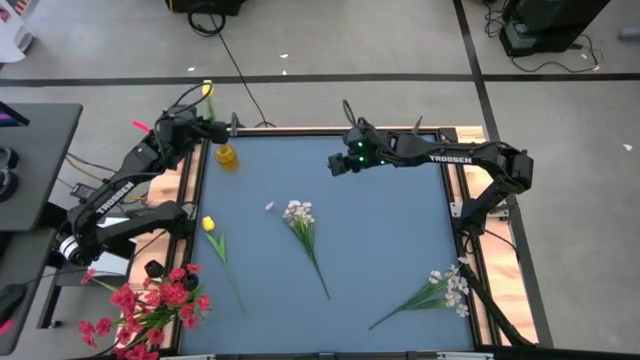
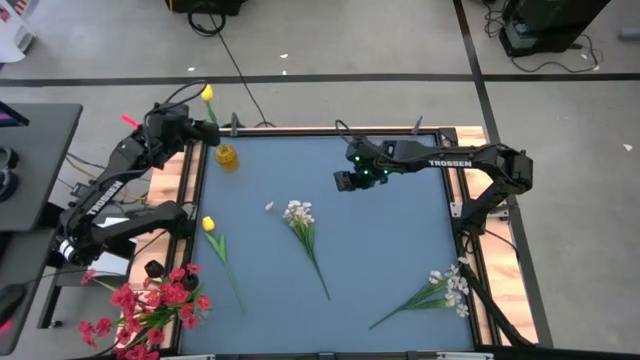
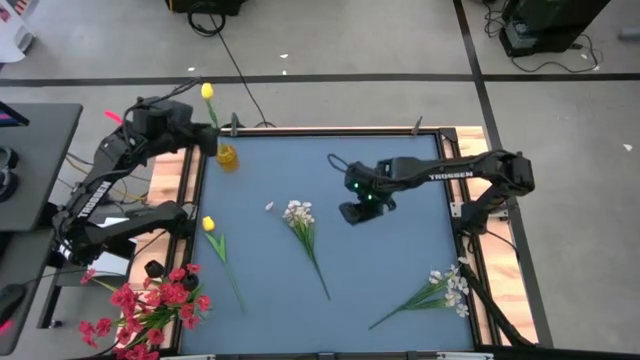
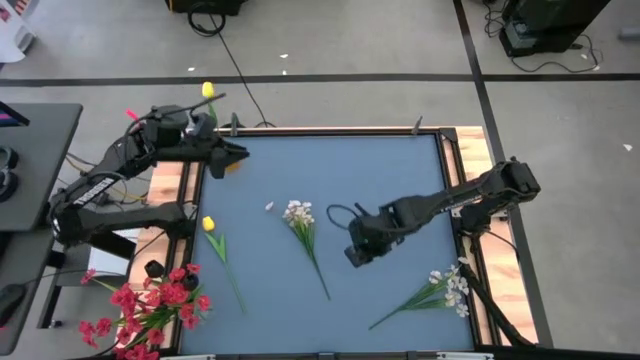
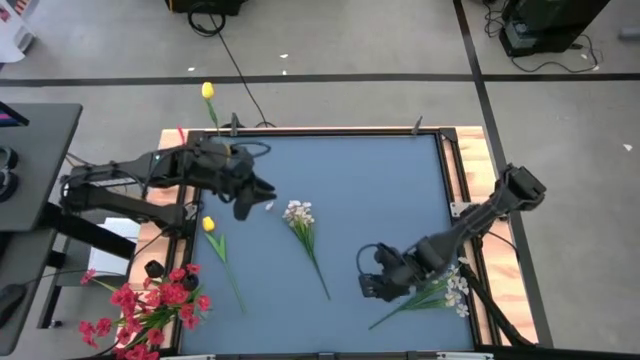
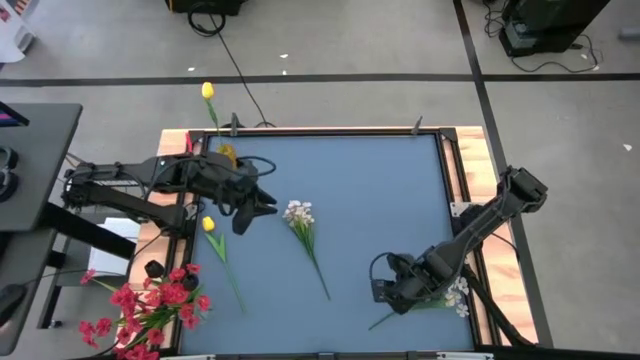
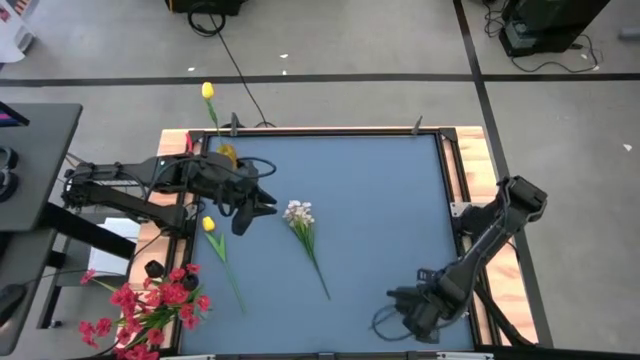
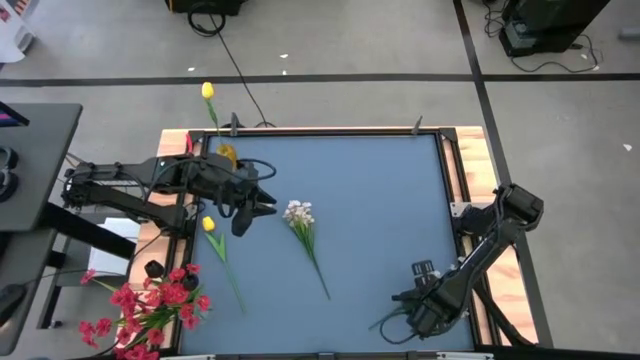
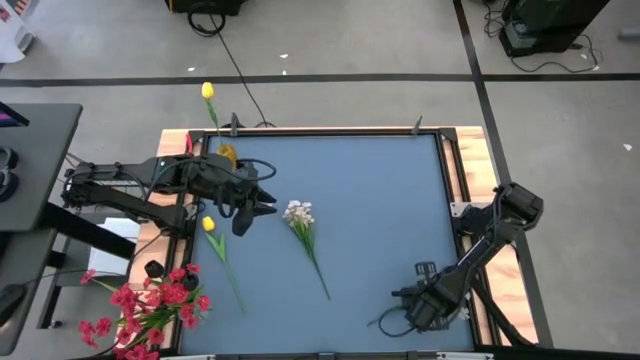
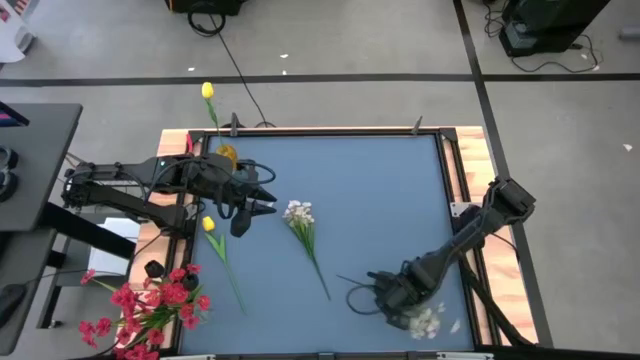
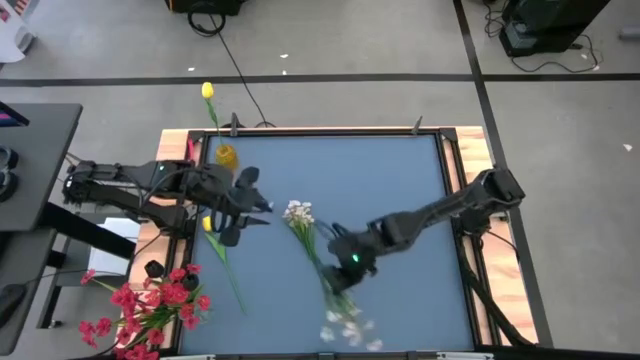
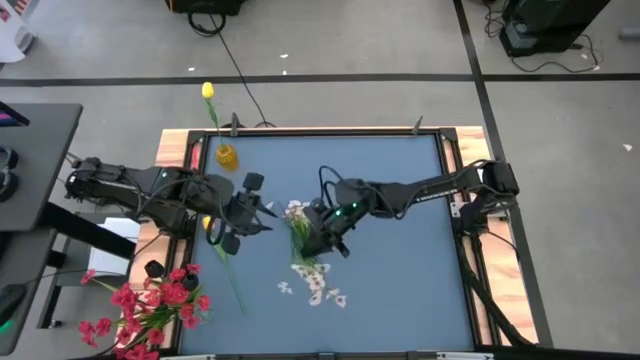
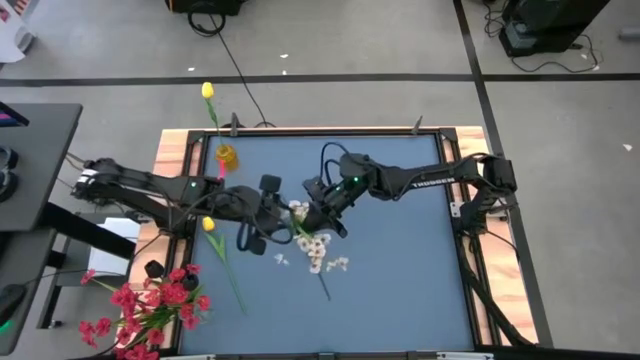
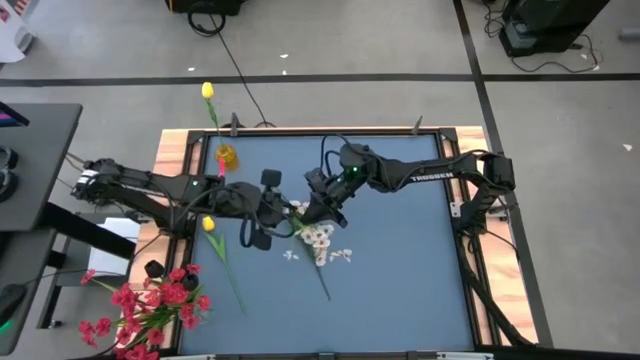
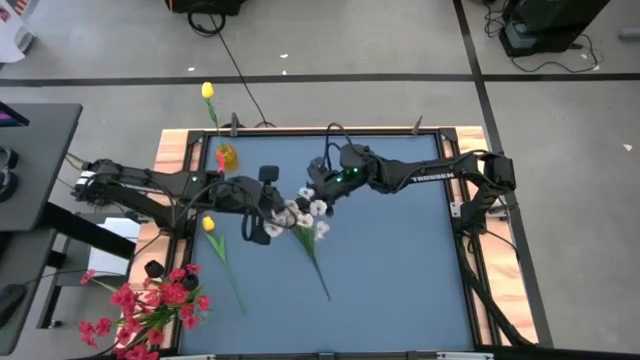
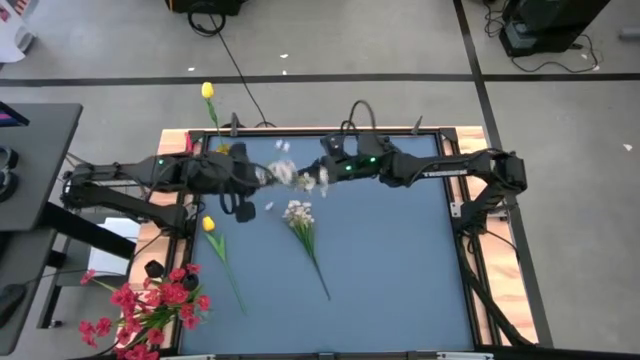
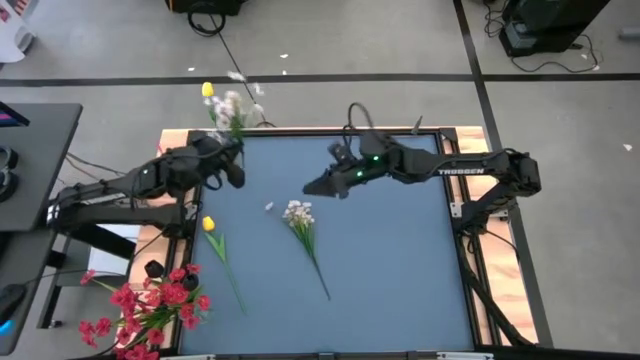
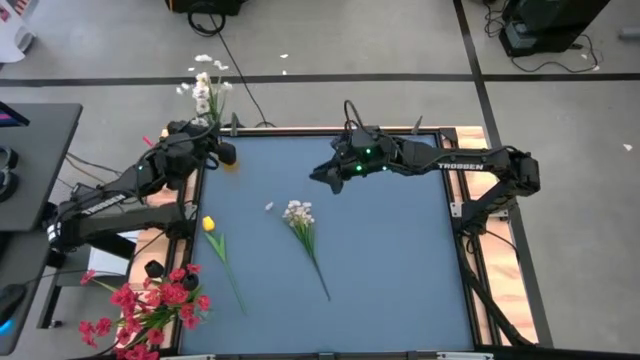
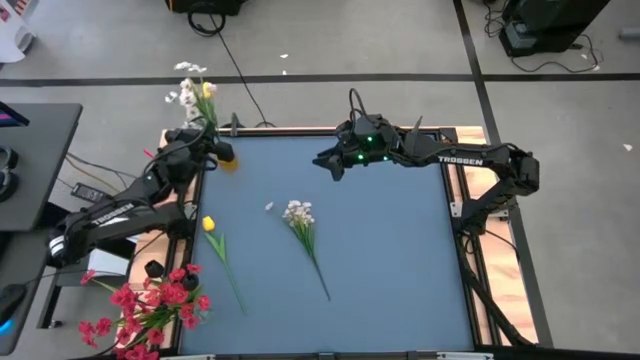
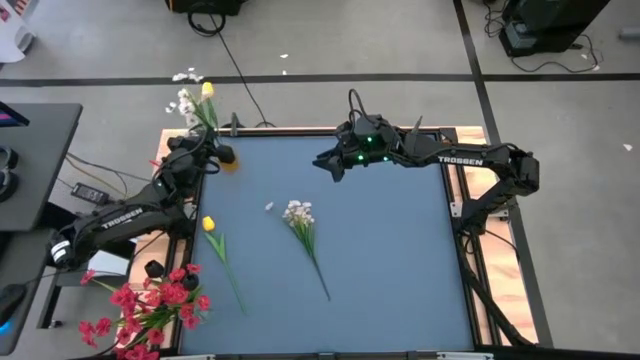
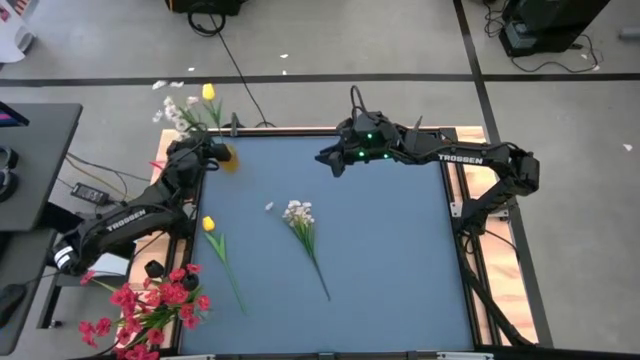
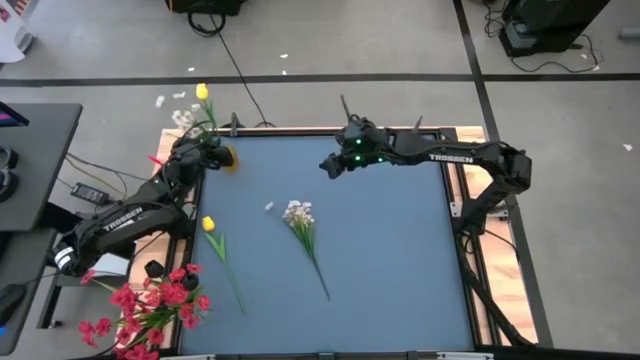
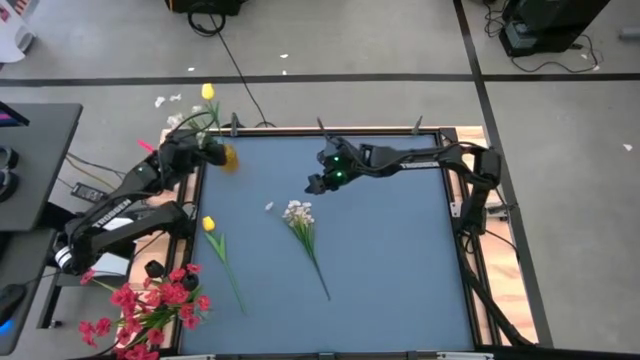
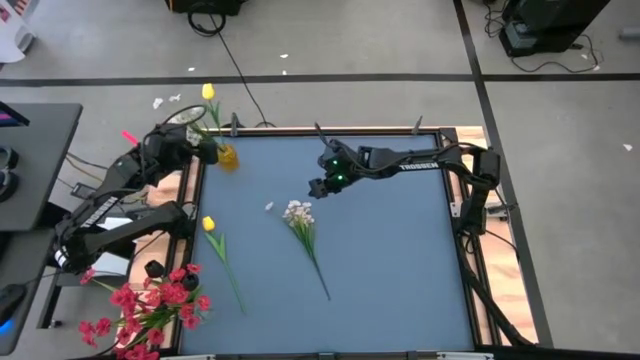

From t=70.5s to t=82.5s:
Task: Sort flowers into vase by color
Put the right white flowers into the yellow transparent vase

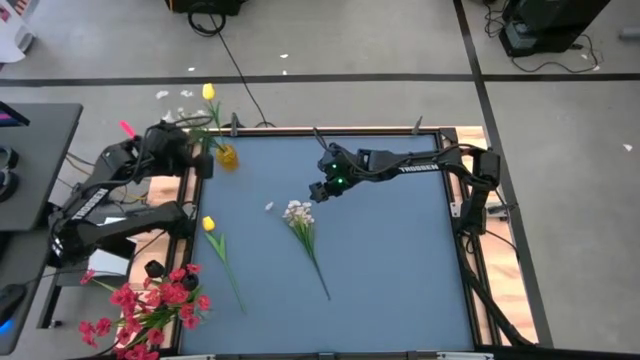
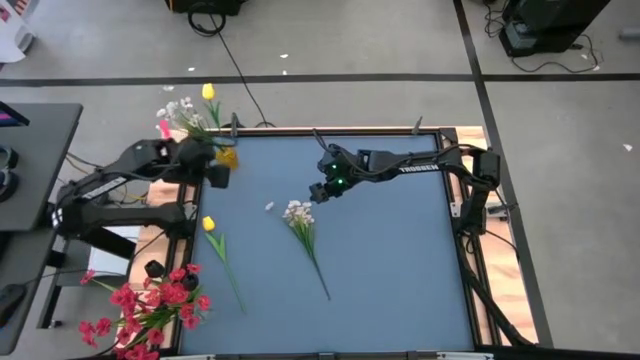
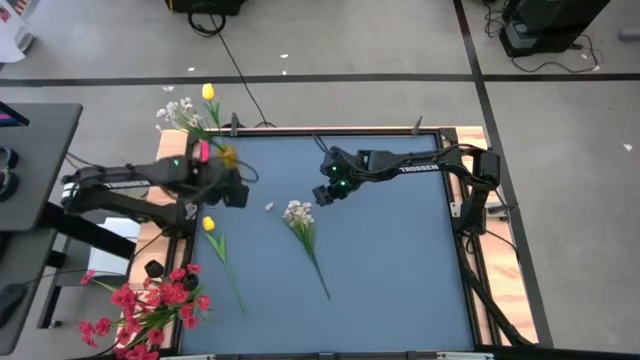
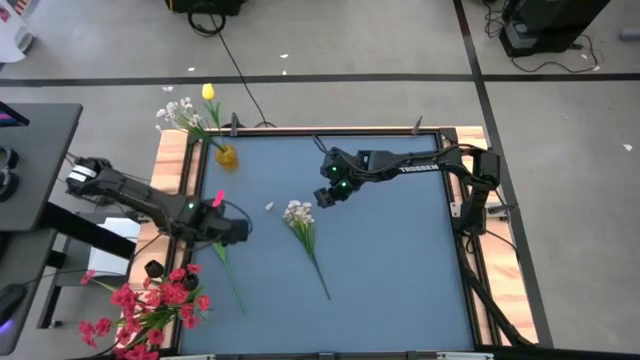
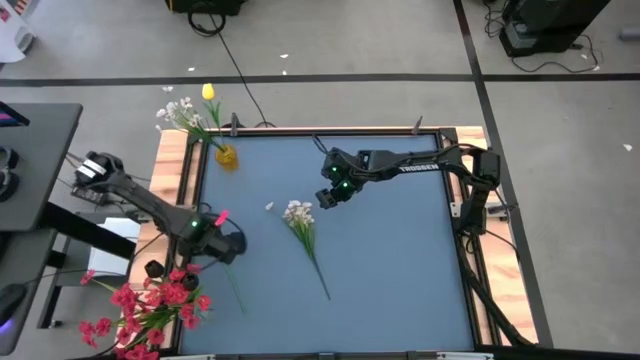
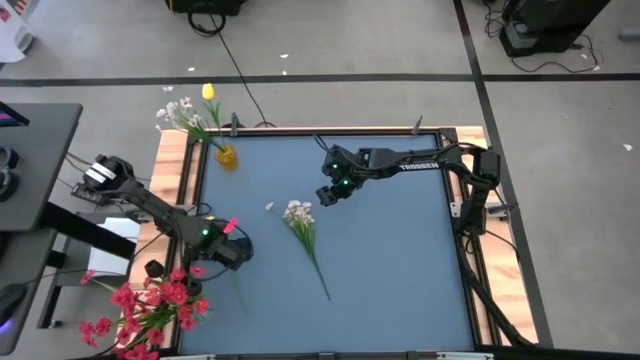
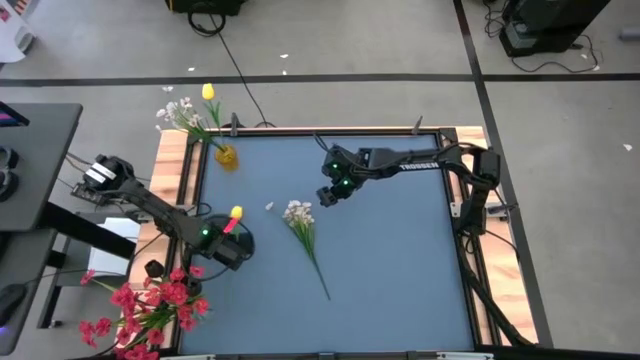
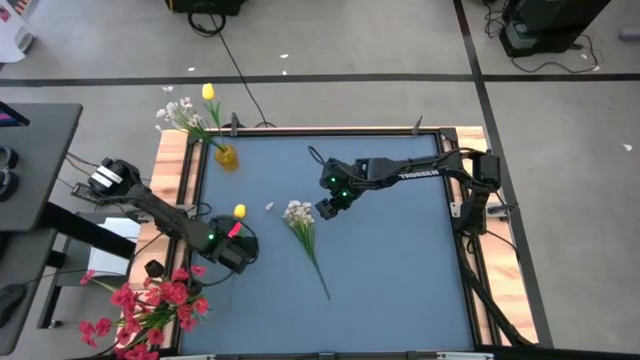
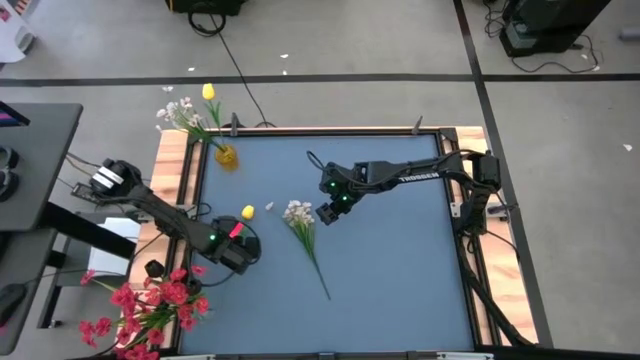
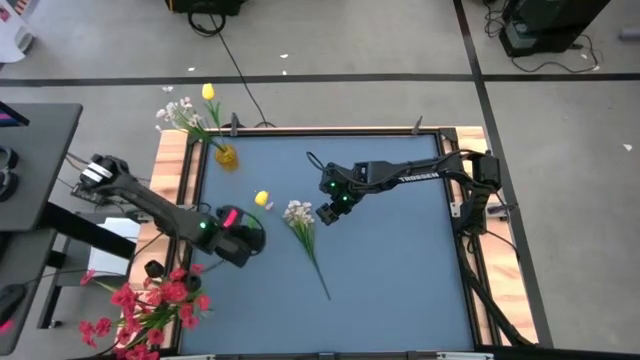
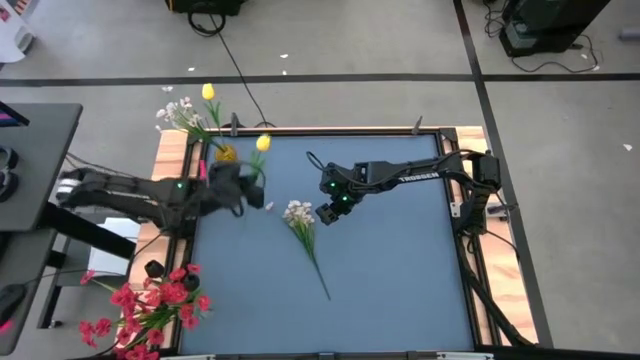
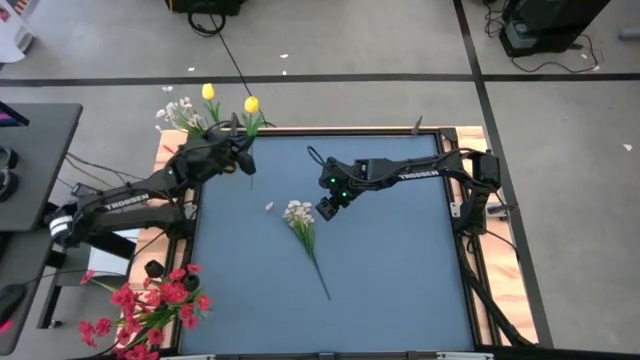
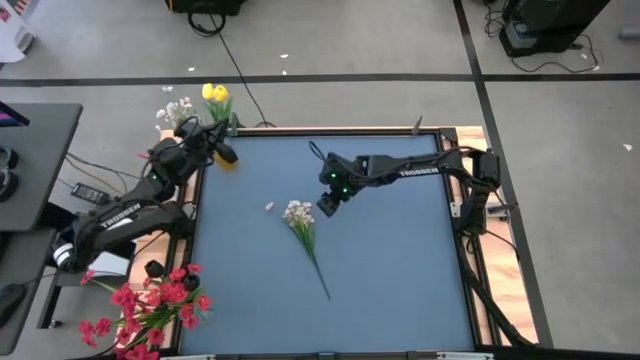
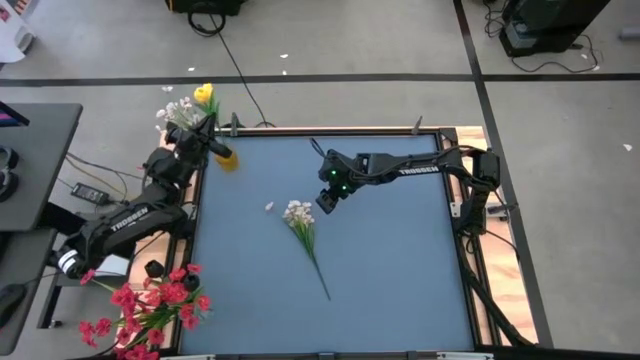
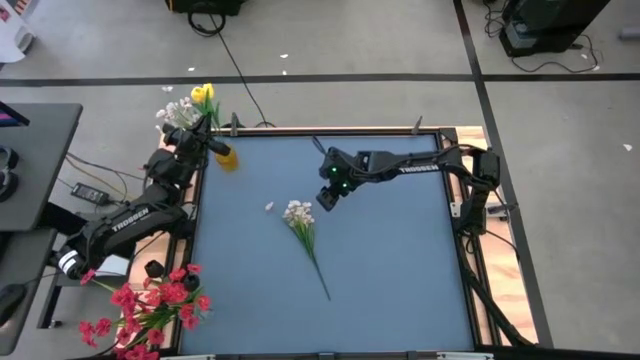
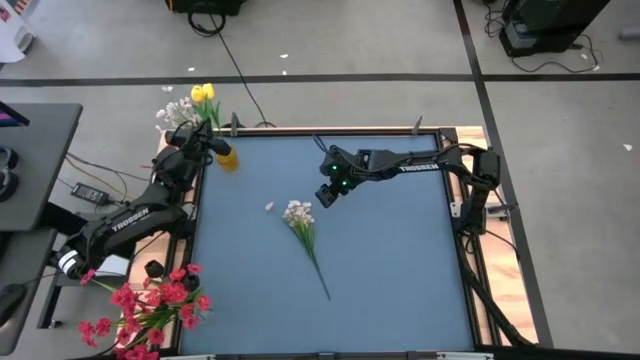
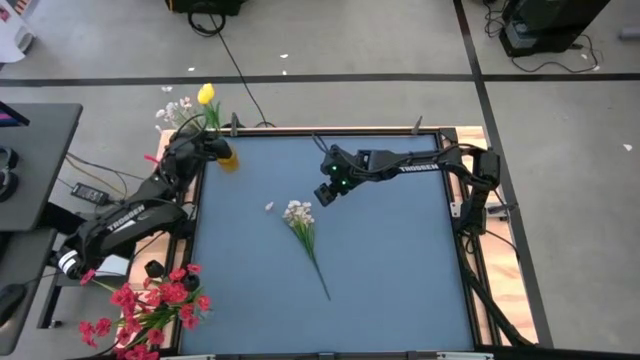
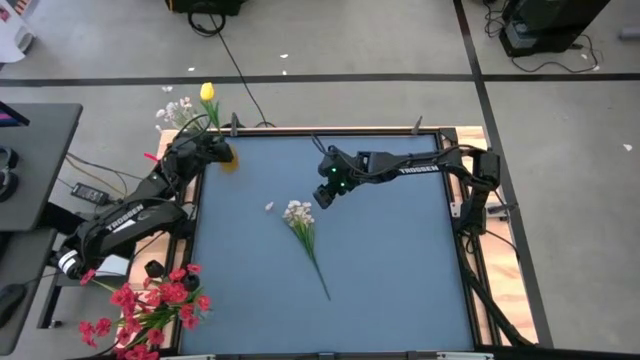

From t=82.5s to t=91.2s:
Put the yellow tulip into the yellow vase

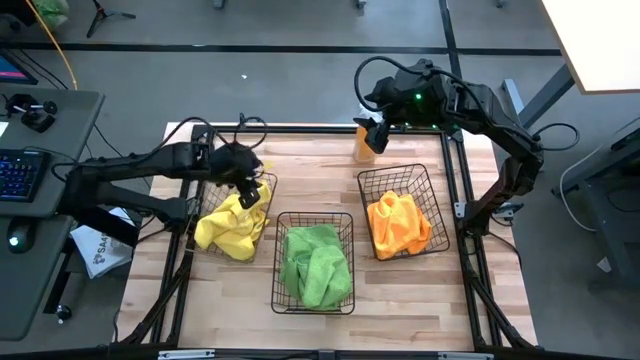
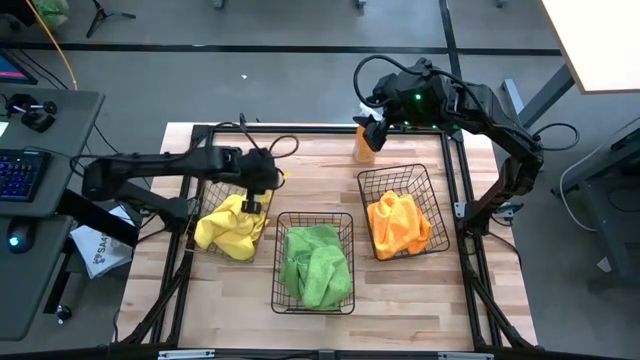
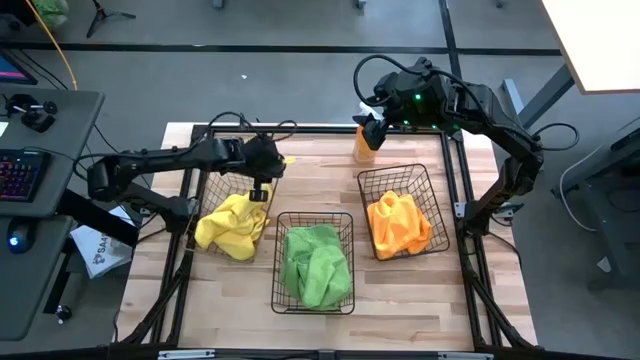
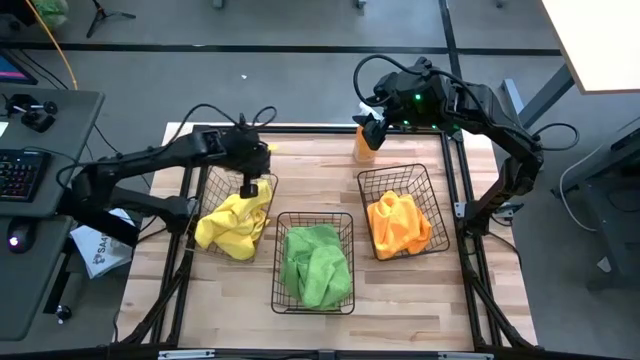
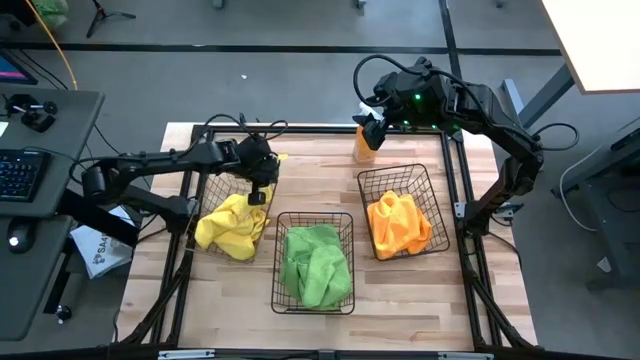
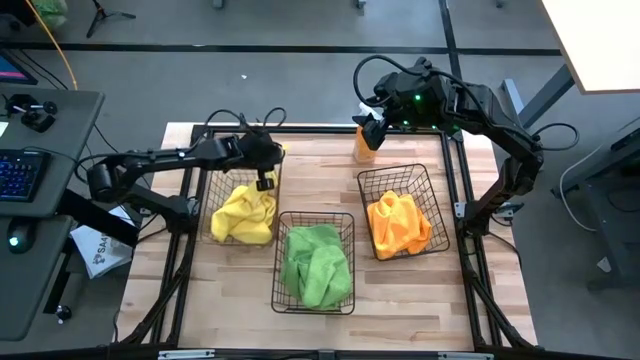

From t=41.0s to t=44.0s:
Task: Sort microfiber towel by color & place in baskets
Adjust the left wire basket
